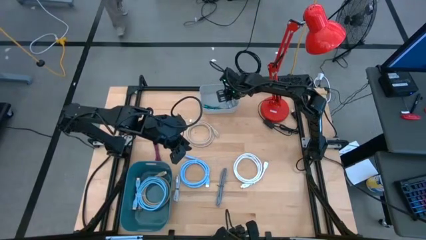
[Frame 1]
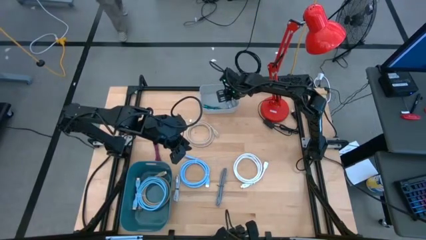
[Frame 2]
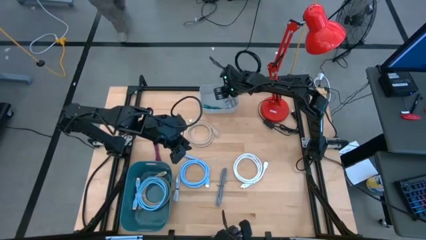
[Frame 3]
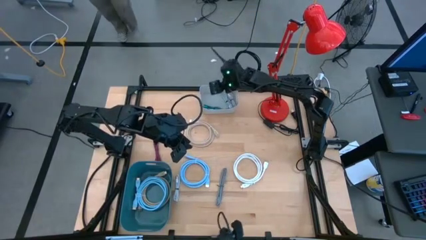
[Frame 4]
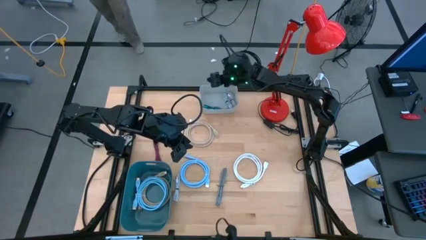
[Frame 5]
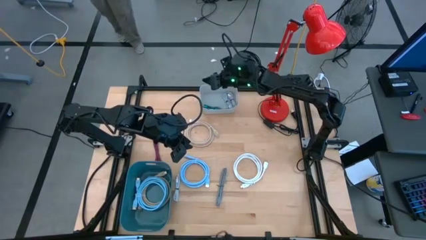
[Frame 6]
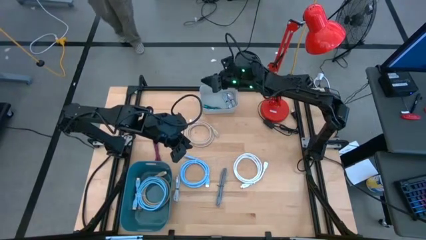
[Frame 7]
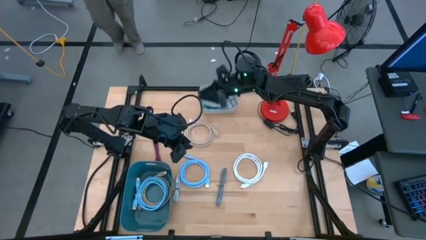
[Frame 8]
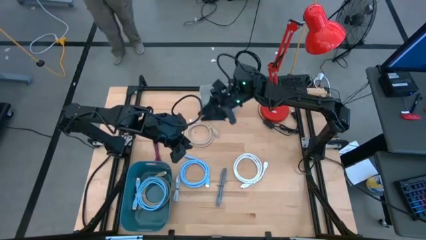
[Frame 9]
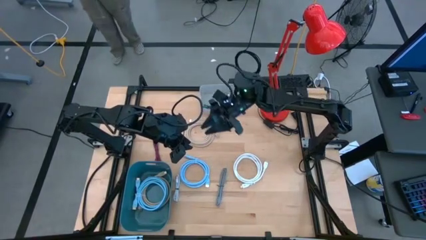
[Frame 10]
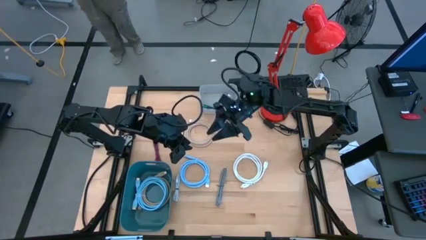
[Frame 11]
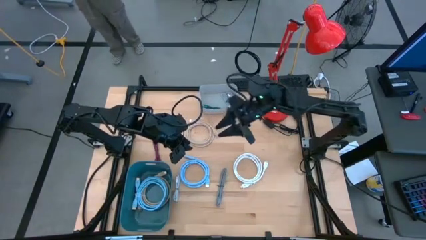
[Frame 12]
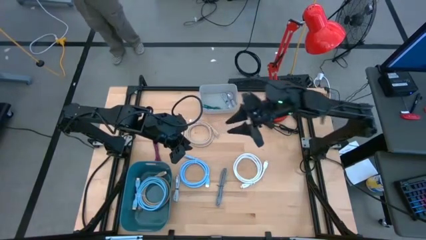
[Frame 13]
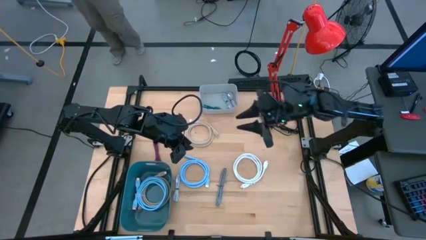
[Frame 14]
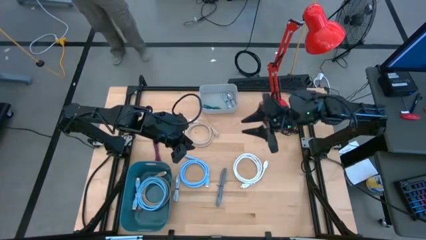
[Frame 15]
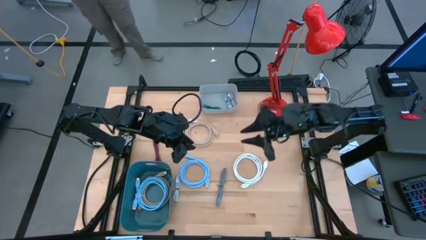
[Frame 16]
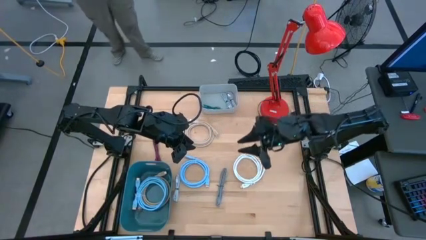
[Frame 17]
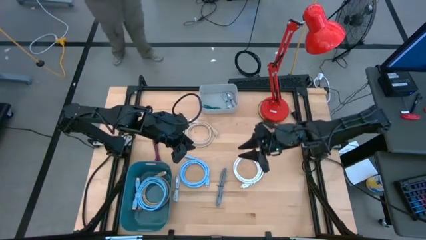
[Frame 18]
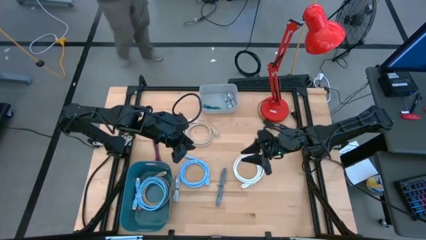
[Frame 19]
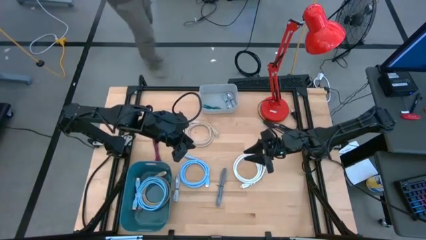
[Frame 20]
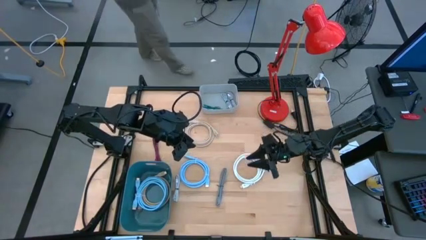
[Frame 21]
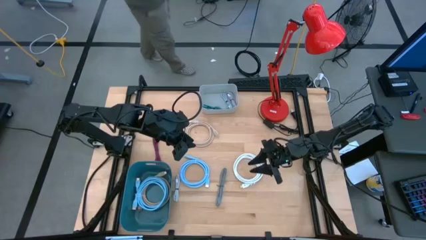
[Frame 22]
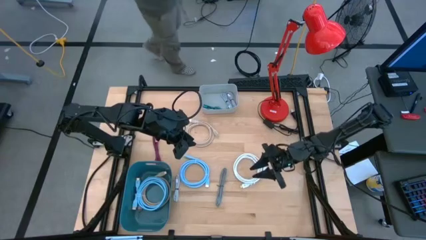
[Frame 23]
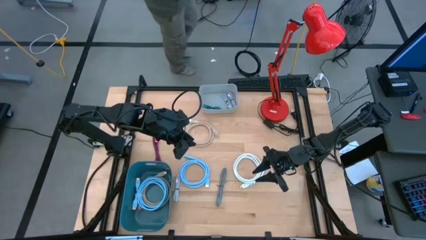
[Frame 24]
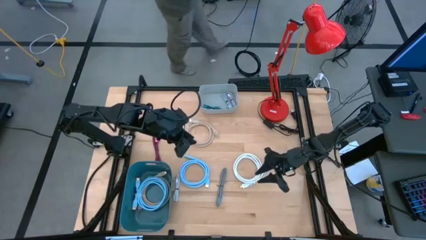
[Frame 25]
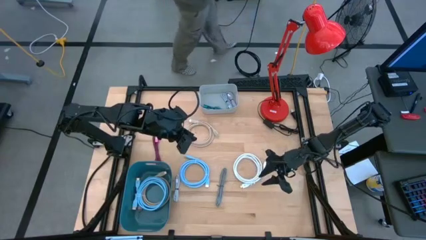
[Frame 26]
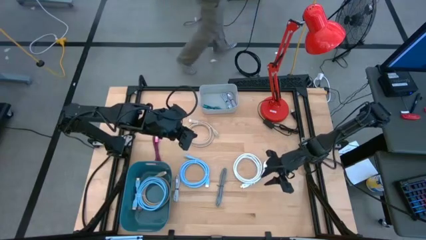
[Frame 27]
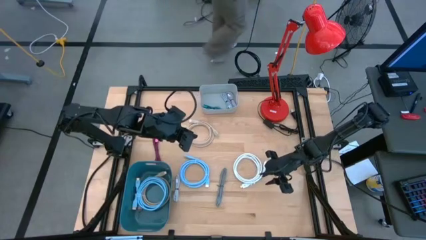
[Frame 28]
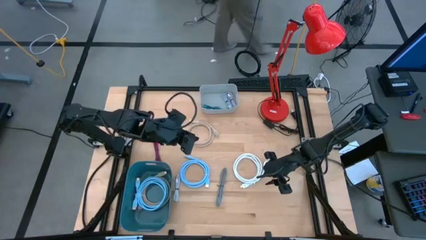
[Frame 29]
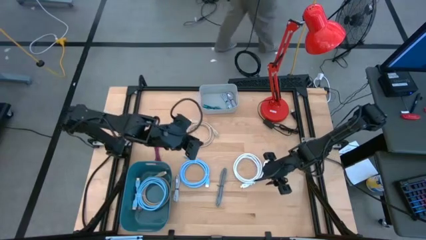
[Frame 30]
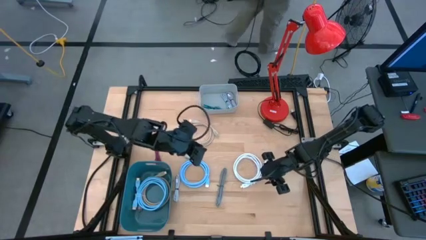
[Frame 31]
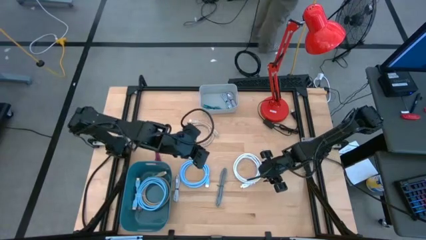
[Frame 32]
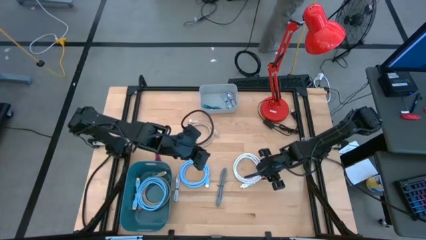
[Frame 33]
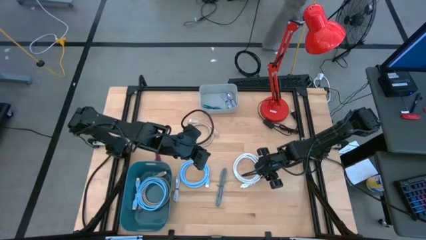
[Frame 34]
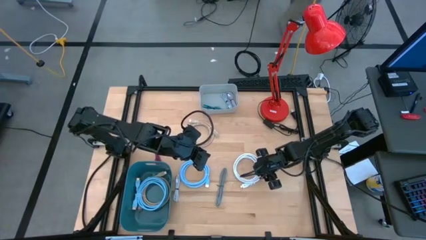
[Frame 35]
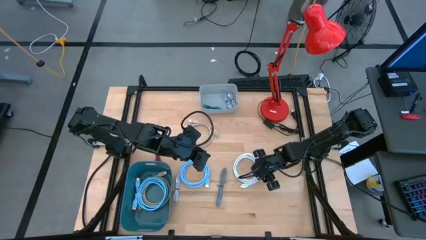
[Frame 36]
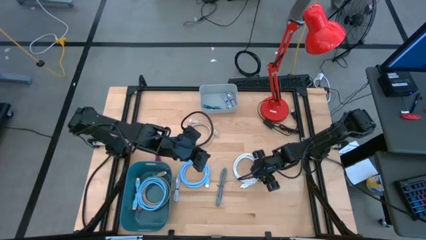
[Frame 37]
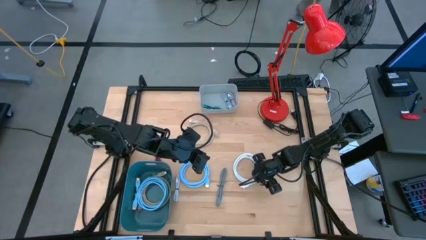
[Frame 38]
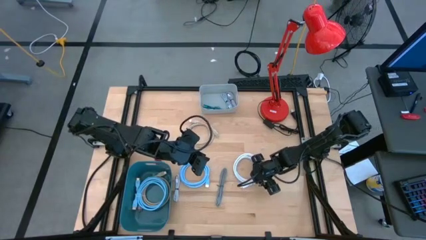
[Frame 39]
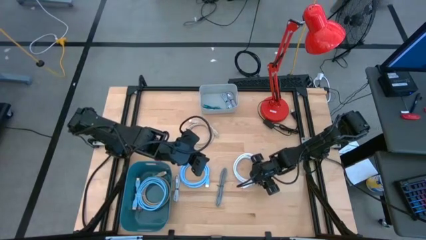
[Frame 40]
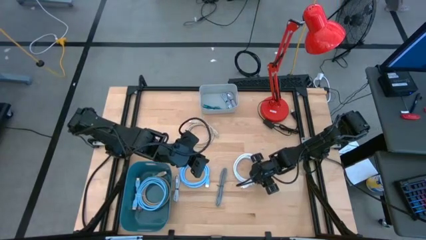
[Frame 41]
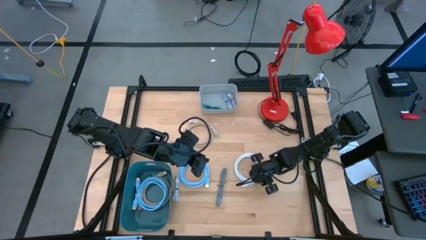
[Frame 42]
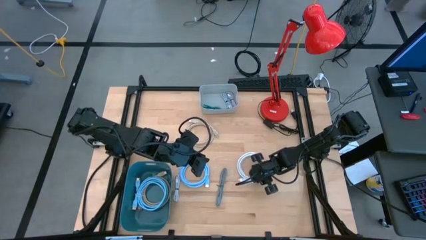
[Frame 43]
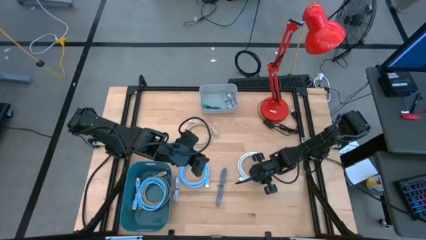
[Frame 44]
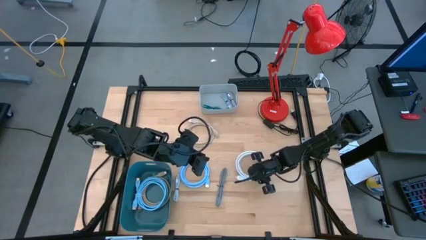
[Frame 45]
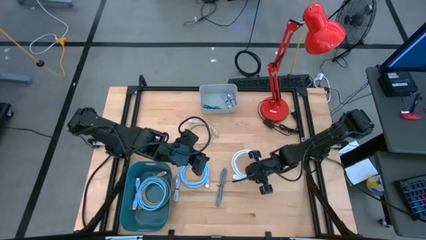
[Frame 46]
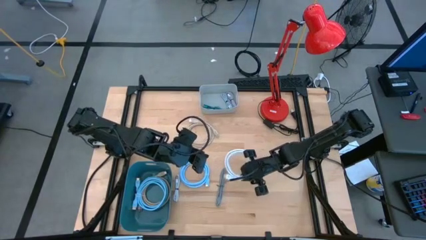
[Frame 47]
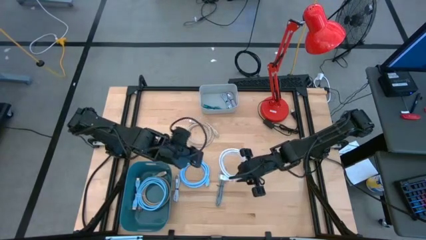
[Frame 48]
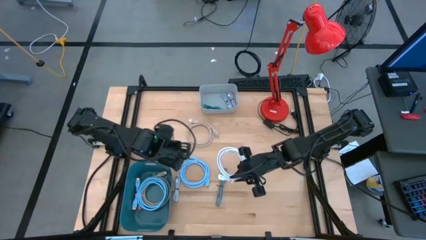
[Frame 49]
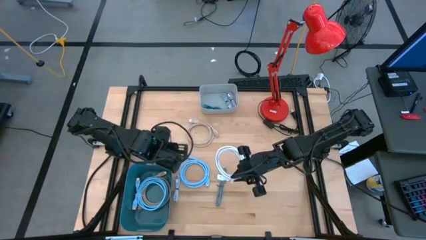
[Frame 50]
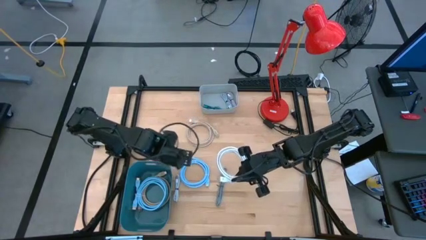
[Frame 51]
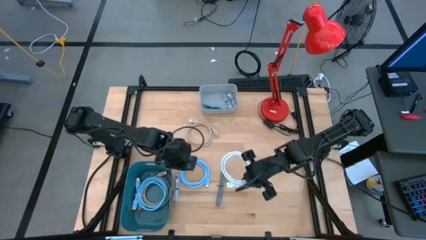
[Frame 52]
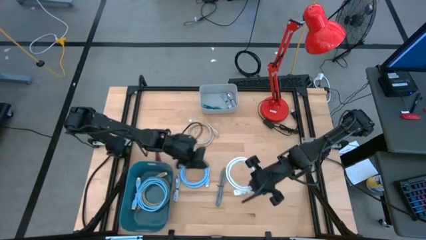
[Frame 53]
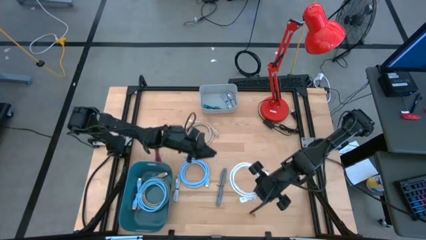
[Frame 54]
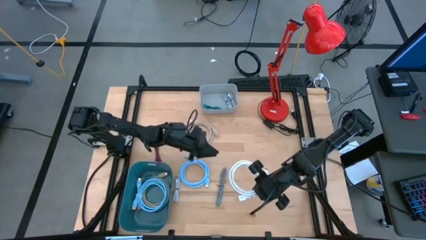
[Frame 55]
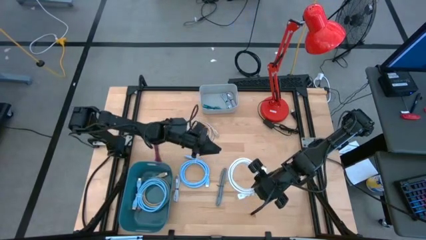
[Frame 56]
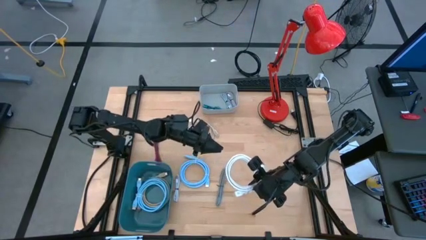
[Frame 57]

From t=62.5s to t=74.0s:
Task: Pick & Place USB Port
Put the white HDMI cable into the blue bin

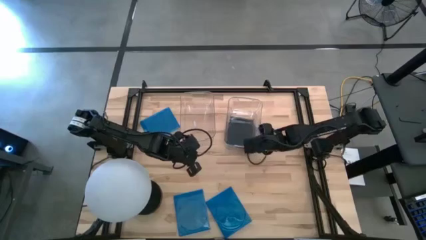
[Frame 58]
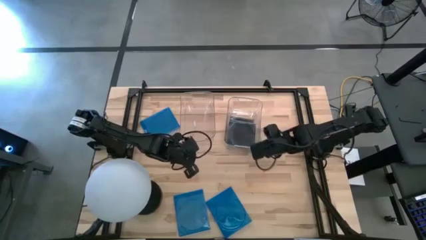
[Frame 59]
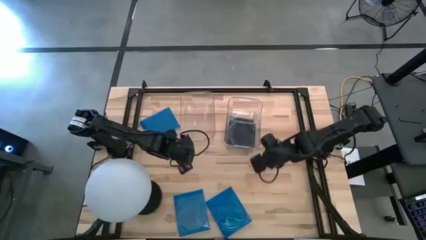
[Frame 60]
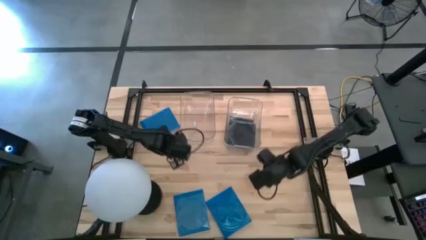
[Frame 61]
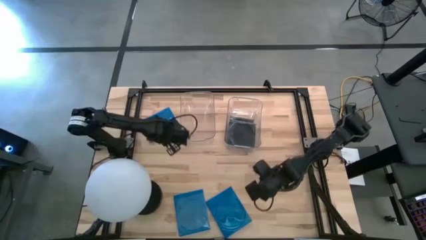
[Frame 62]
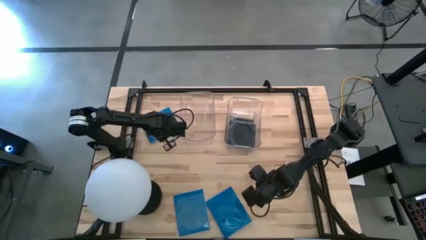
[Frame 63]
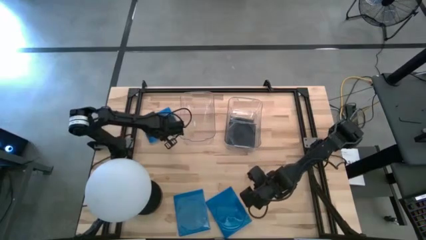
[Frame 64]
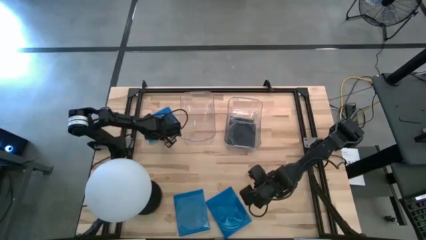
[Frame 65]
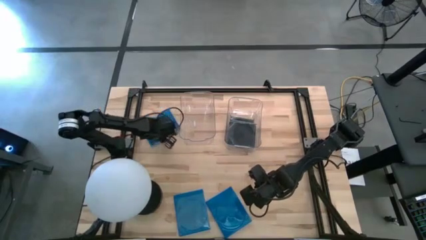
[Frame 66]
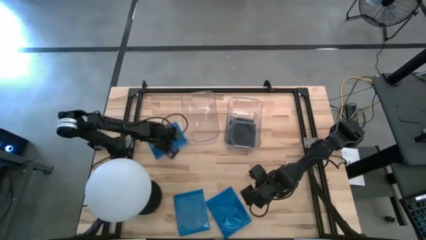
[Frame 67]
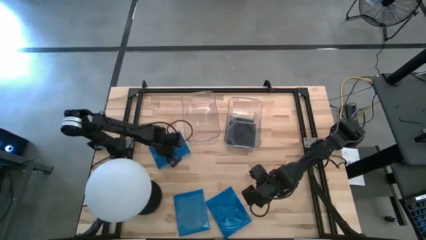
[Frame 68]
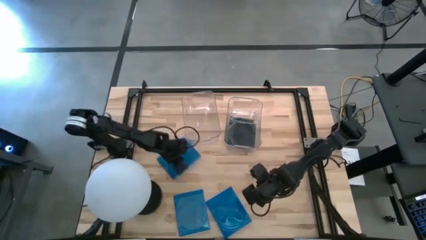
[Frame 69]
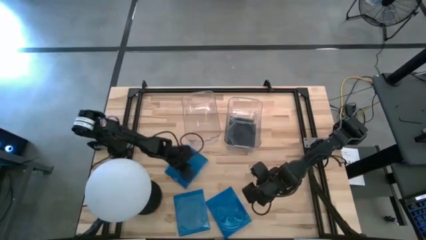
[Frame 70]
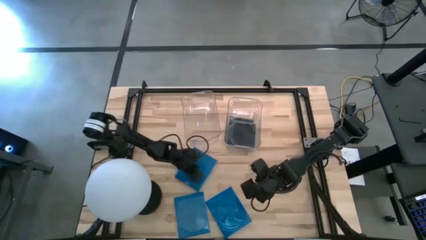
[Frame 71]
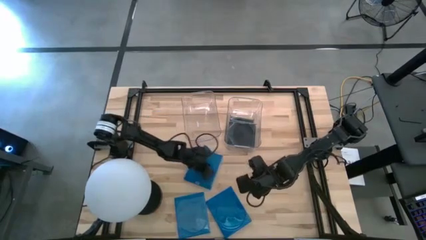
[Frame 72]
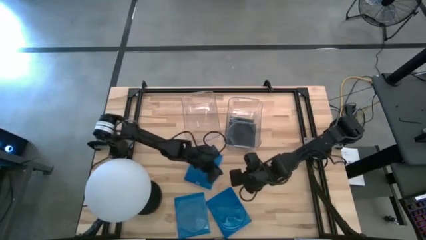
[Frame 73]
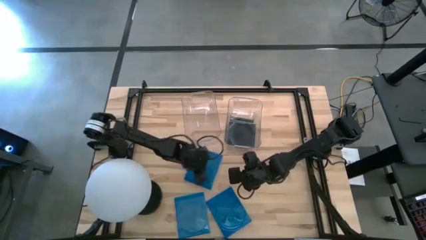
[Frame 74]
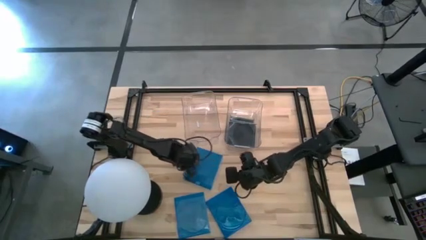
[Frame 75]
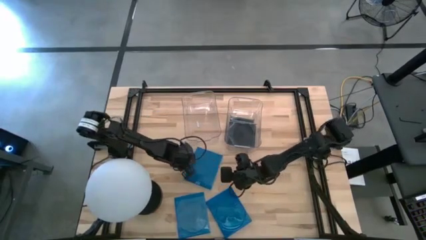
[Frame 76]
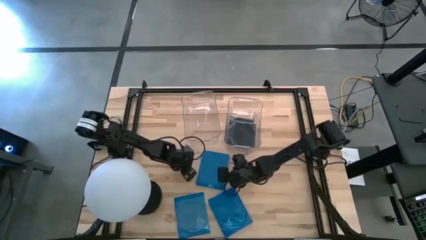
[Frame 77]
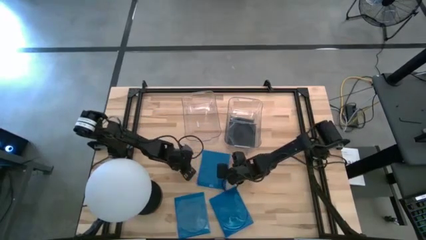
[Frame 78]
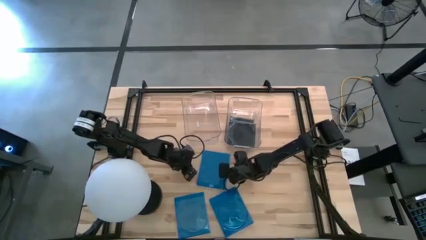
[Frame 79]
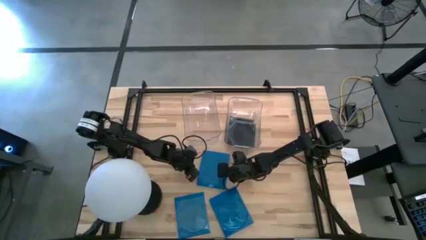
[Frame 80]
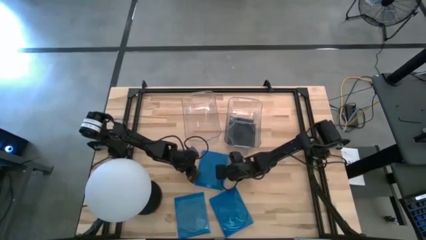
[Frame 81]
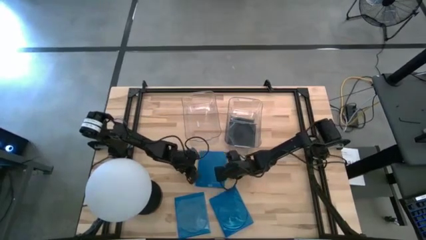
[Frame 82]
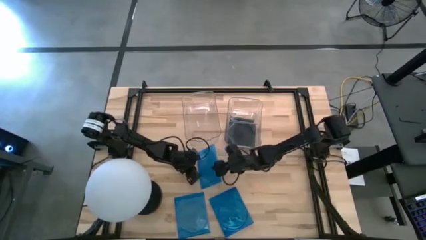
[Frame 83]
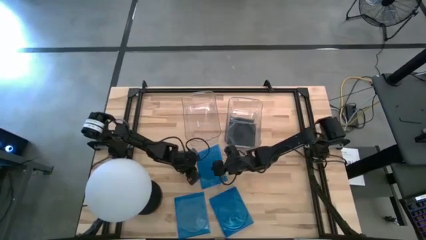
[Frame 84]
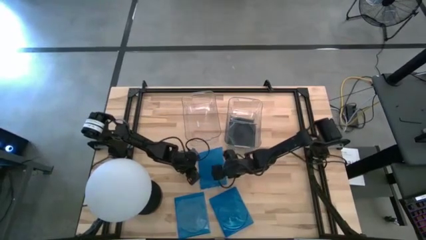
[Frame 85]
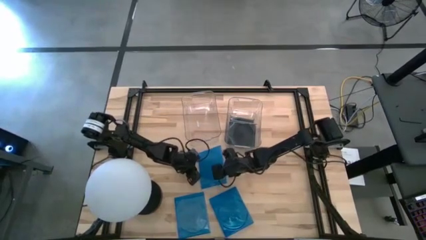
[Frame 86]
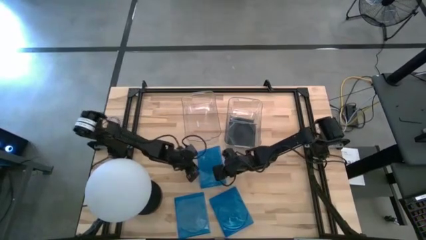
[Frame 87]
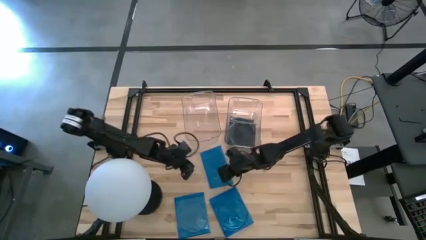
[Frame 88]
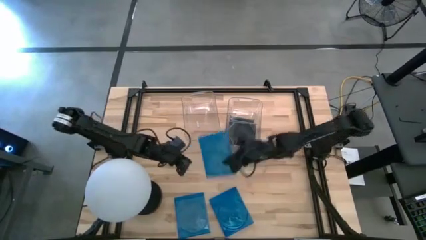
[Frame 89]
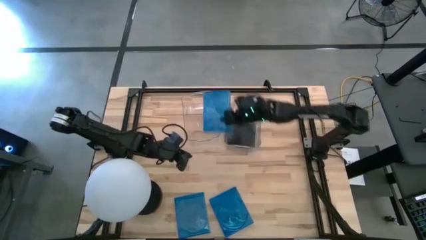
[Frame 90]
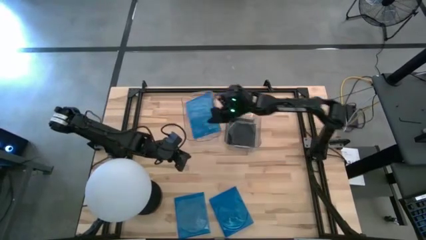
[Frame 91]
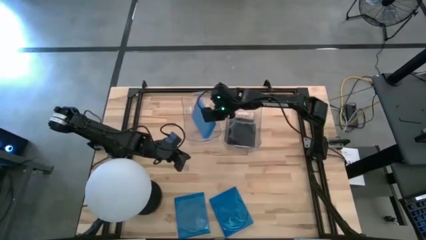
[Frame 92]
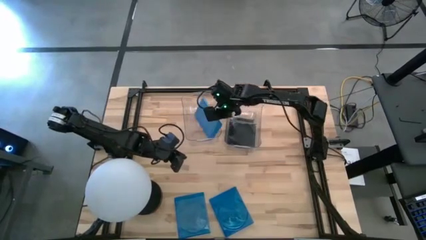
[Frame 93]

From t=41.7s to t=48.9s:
Task: Pick & place jewel cases by type
Put the blue CD case into the left transparent bin
